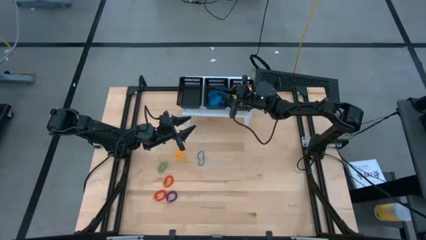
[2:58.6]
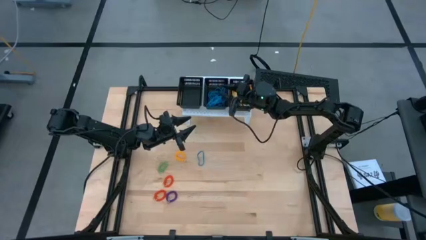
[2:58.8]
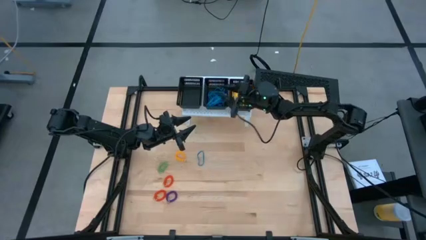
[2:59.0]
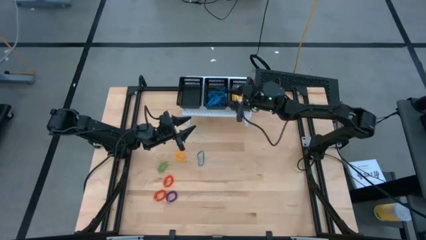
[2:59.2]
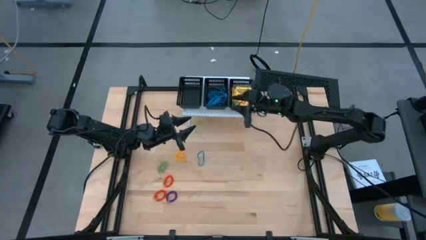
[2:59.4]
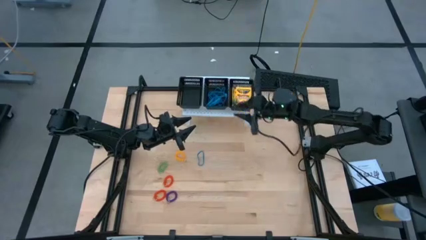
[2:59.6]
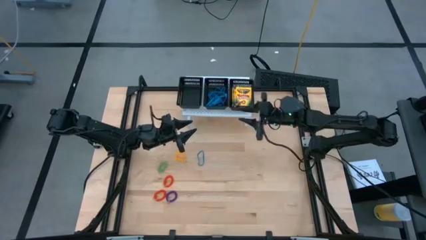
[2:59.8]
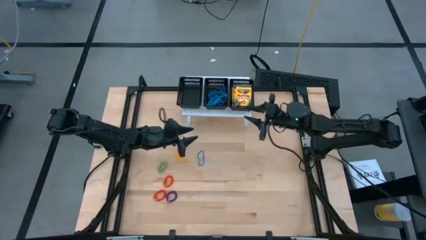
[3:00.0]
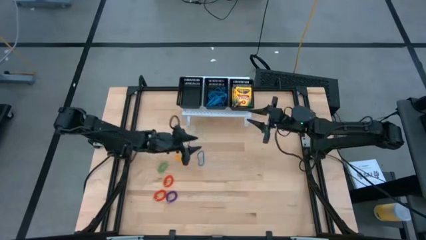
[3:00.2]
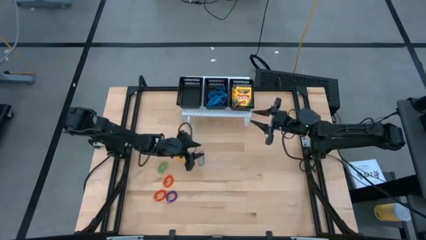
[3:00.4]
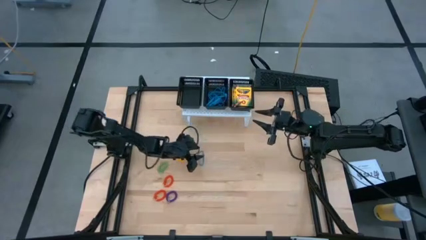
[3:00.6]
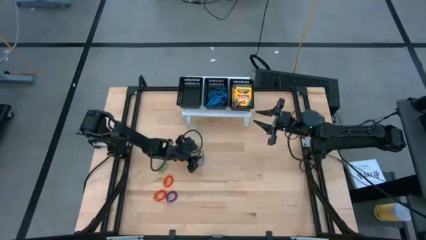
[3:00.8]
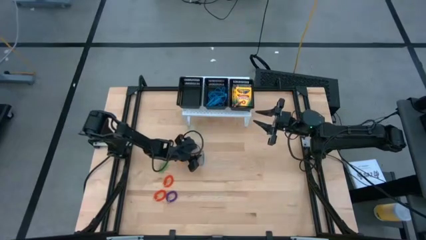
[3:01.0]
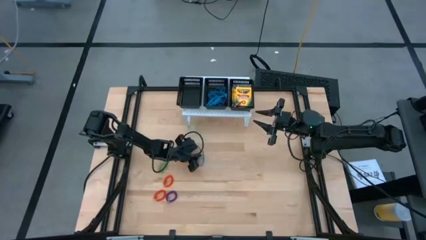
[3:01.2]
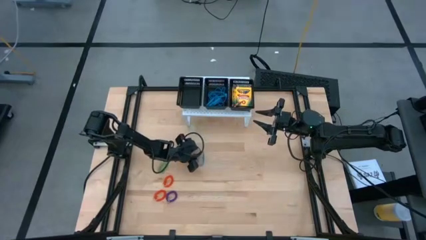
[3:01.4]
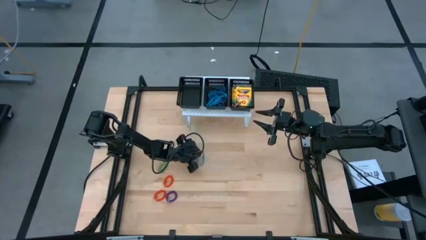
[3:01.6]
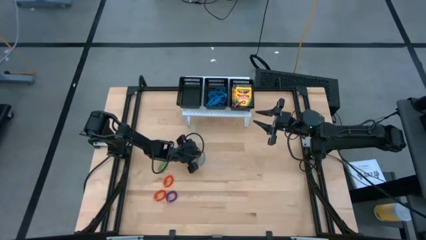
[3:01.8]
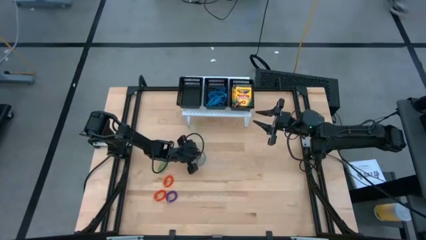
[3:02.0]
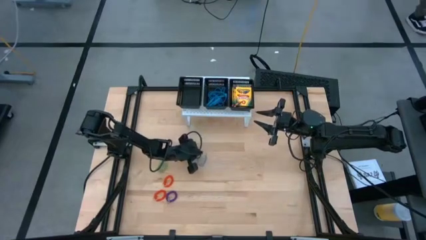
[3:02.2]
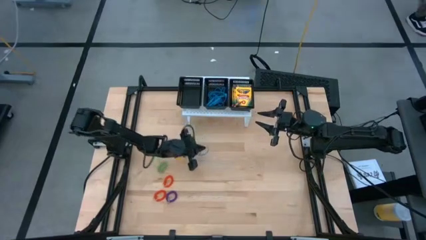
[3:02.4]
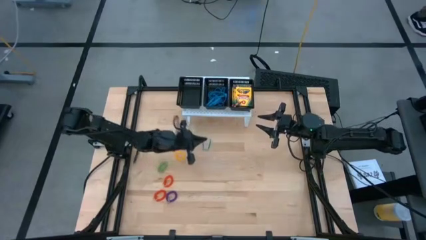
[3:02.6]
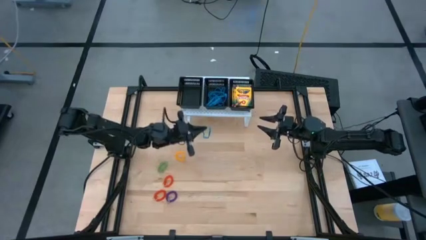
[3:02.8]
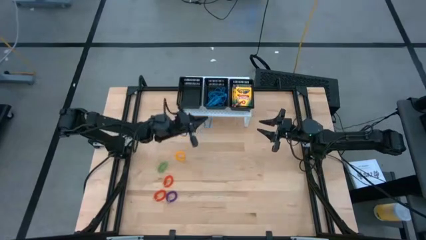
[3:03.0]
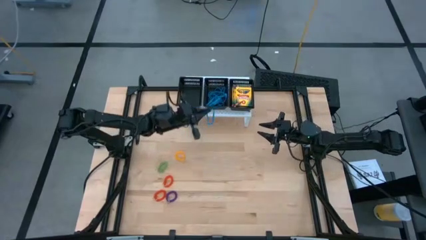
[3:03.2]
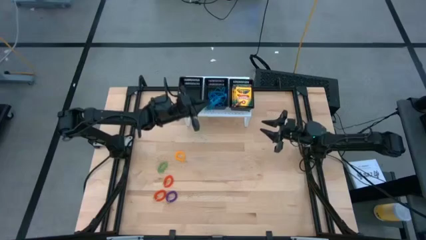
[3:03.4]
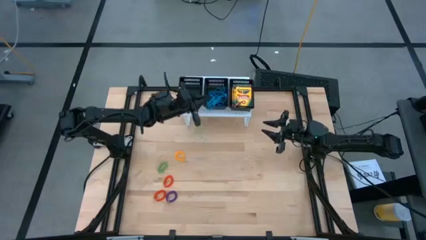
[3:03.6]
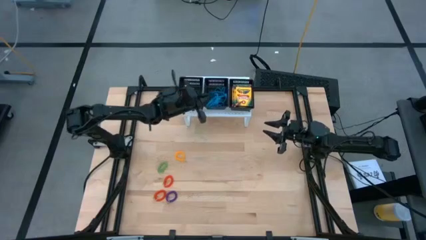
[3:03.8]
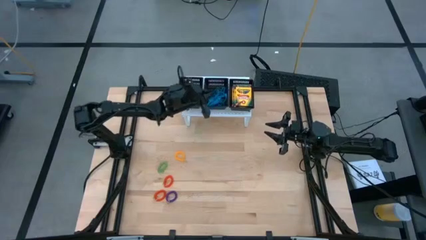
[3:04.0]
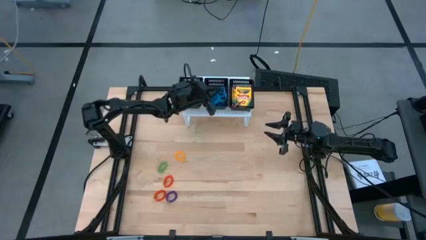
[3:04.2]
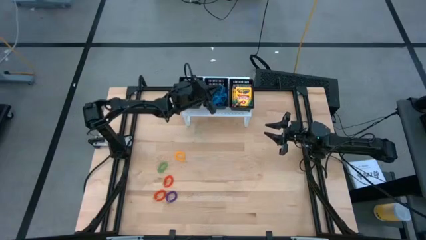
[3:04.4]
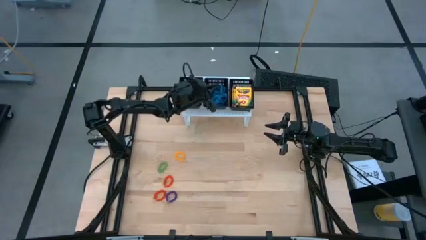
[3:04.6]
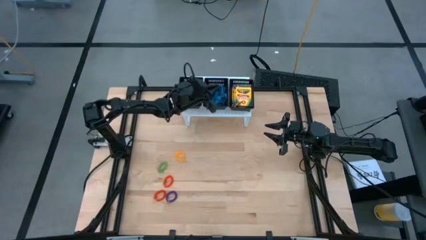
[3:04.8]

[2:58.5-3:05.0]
Task: Pick & Place Office Desk Supplies
Put the blue rubber band into the middle black bin

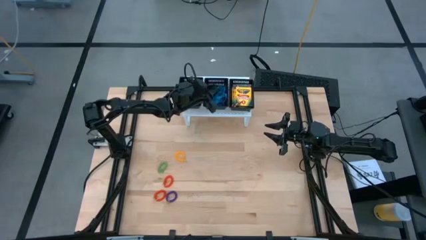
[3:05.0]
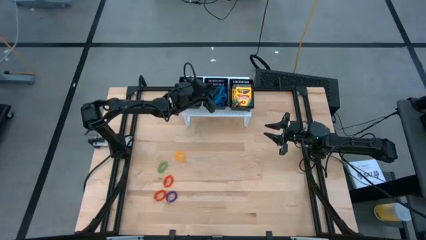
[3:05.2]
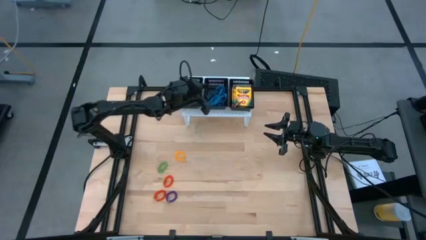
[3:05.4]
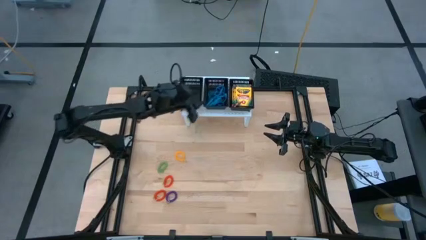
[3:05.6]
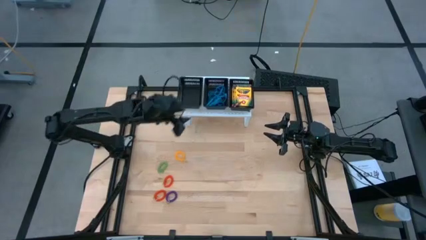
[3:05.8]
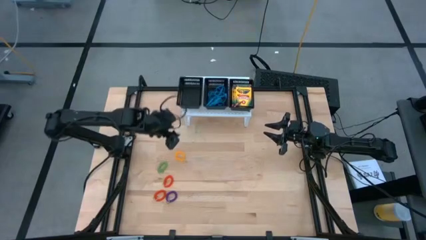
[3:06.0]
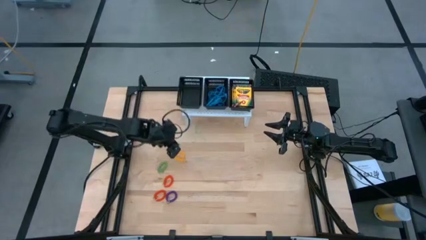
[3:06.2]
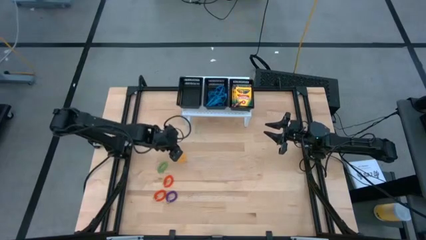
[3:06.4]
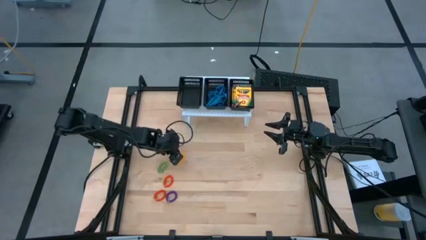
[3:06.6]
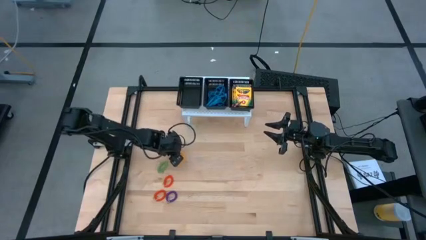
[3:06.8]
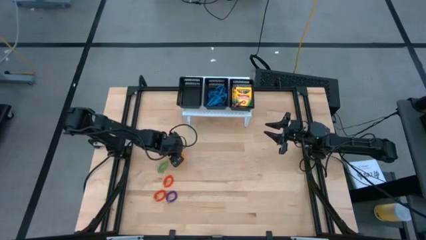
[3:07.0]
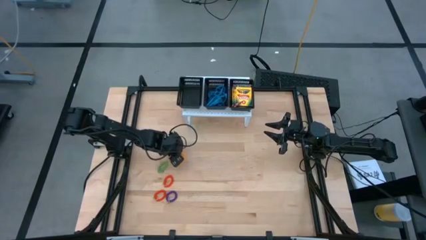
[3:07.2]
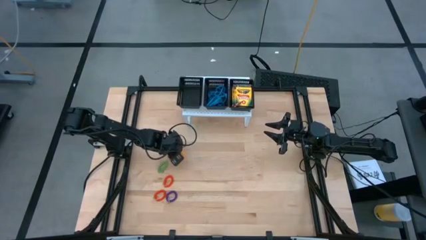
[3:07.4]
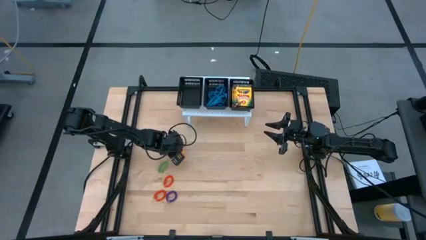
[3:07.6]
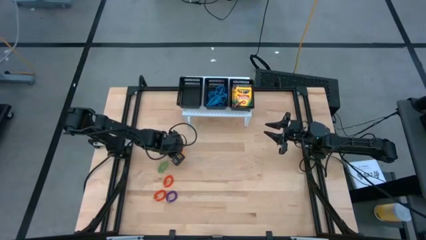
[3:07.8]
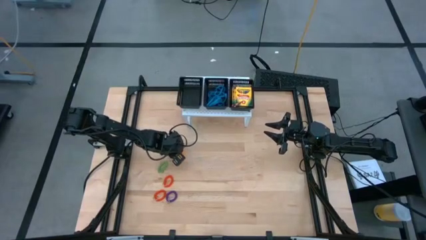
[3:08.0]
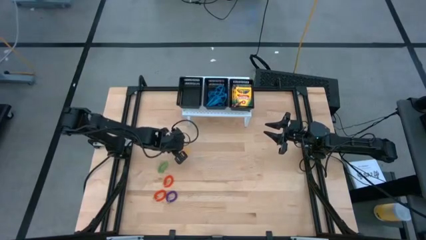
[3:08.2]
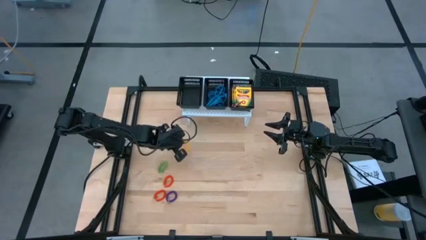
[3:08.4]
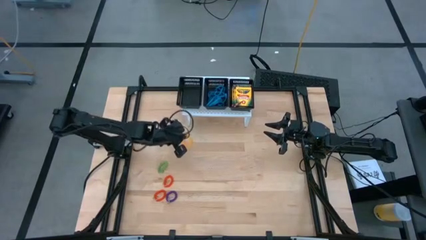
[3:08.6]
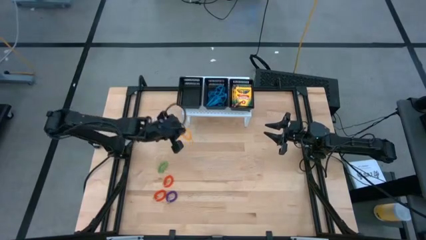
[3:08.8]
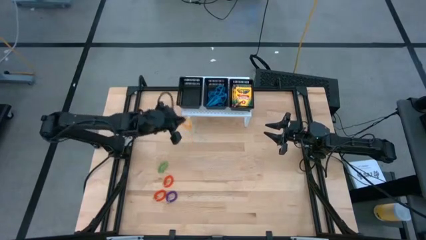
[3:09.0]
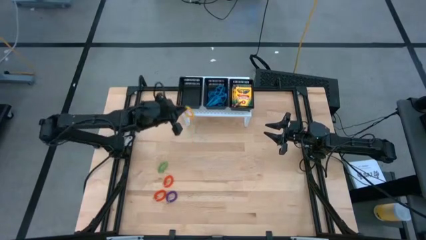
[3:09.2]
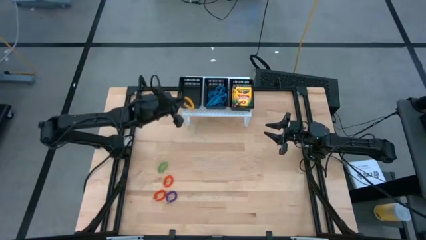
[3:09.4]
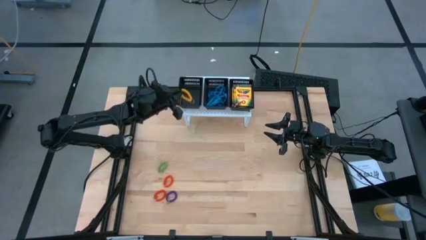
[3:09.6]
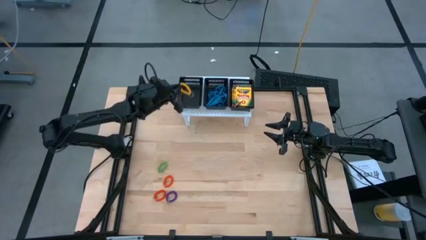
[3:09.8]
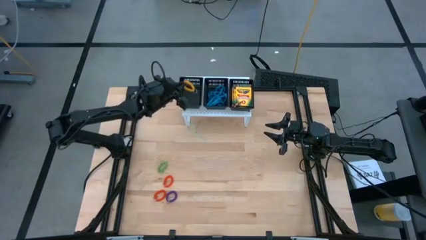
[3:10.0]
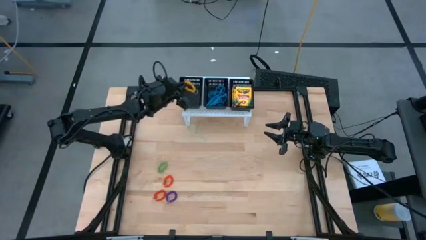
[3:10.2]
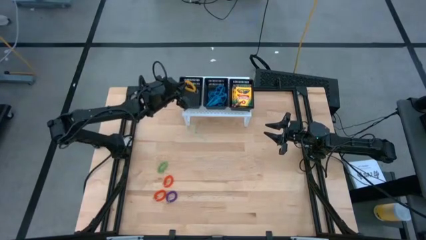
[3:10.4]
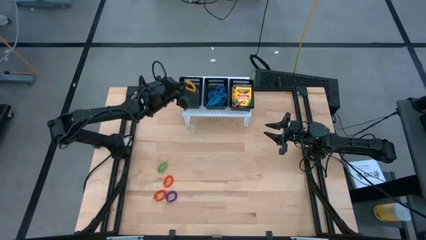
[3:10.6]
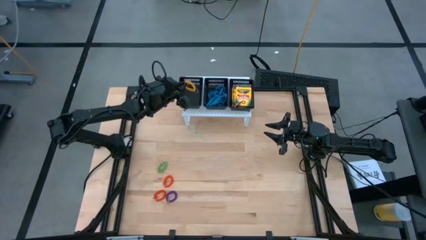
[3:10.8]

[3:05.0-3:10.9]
Put the yellow spring keychain into the left black bin
